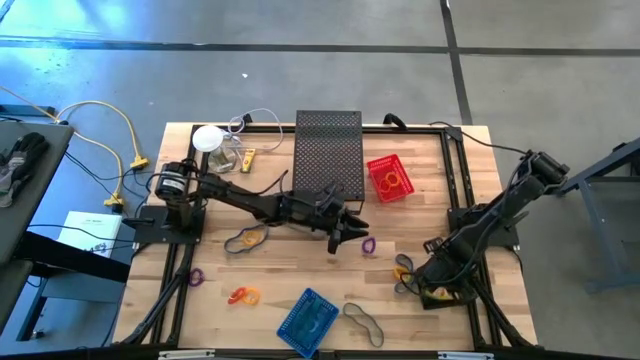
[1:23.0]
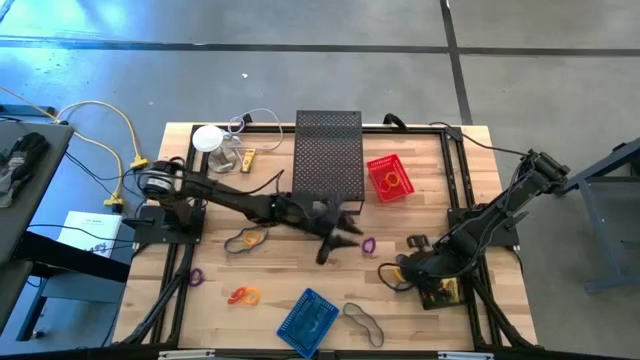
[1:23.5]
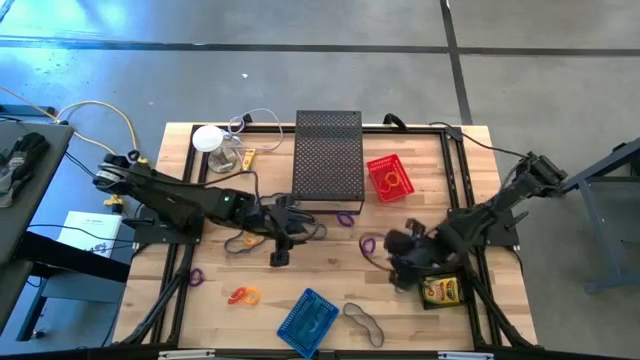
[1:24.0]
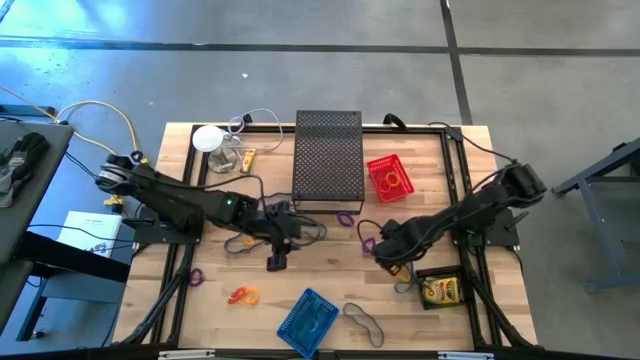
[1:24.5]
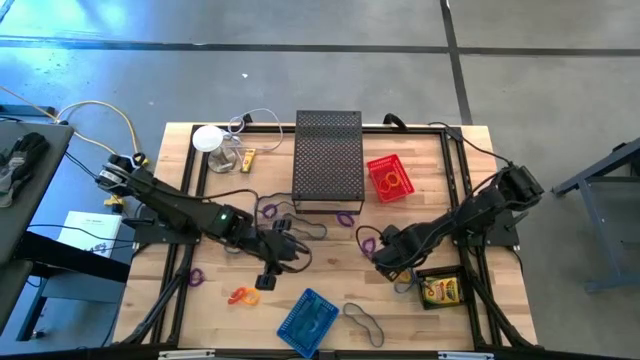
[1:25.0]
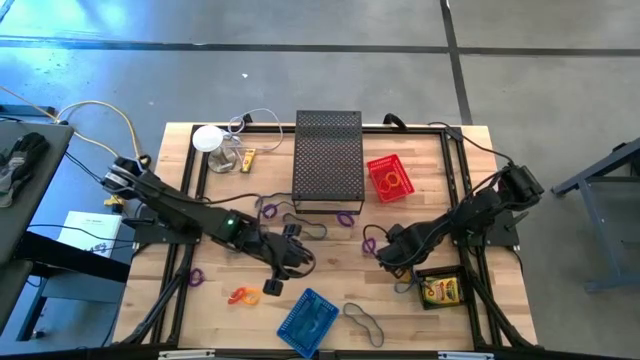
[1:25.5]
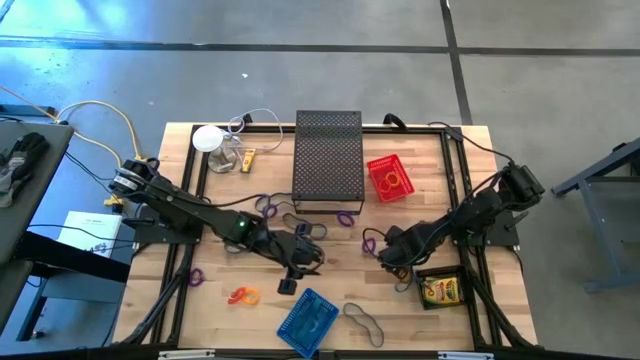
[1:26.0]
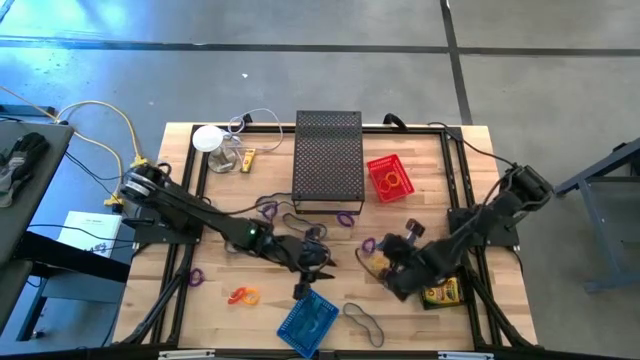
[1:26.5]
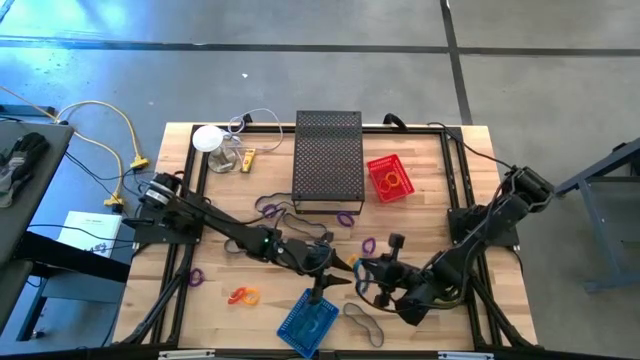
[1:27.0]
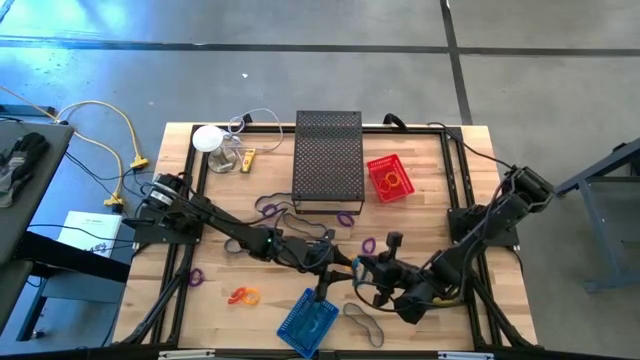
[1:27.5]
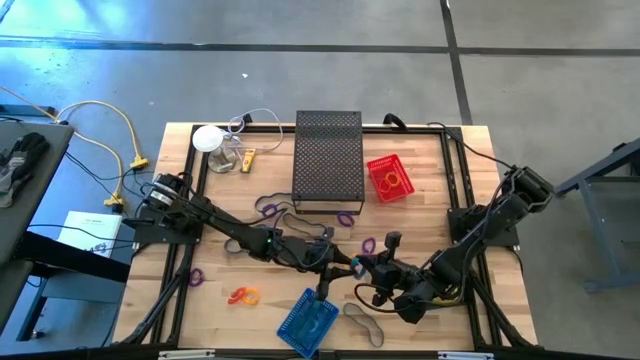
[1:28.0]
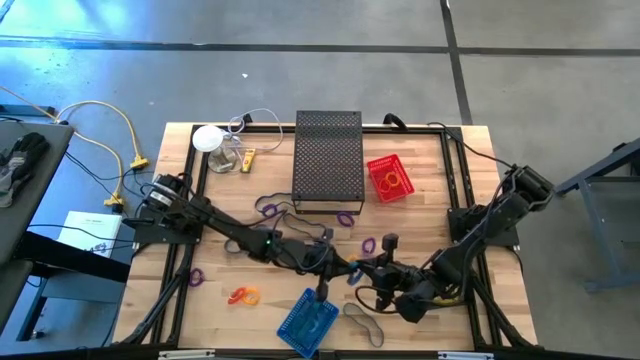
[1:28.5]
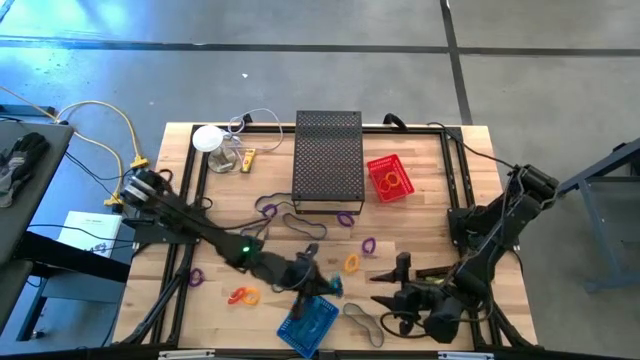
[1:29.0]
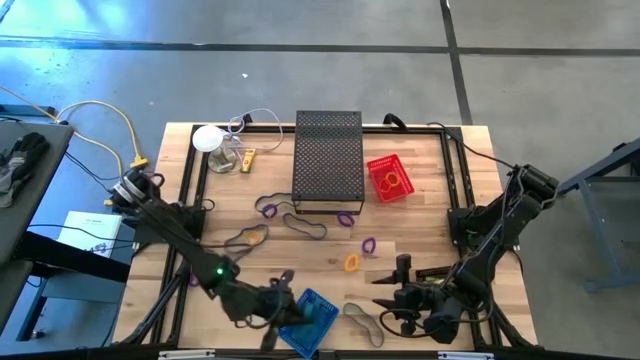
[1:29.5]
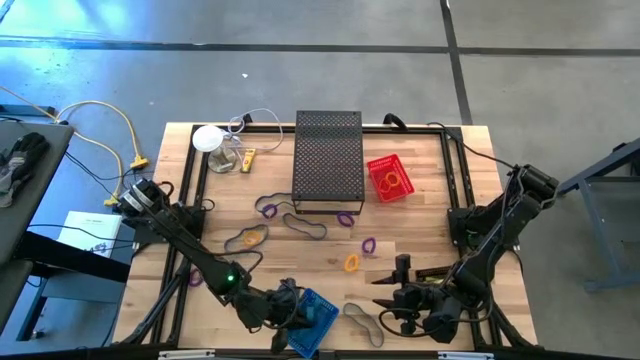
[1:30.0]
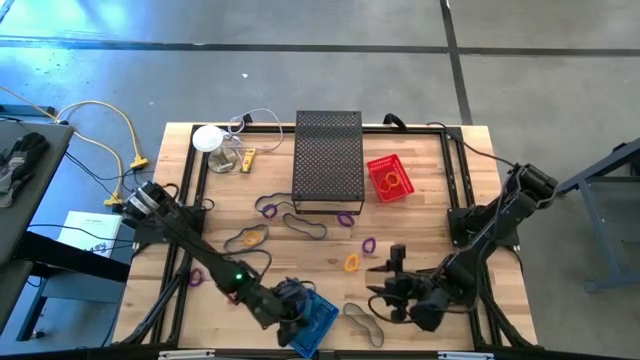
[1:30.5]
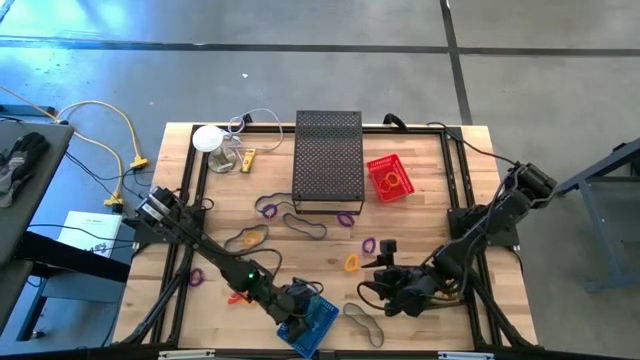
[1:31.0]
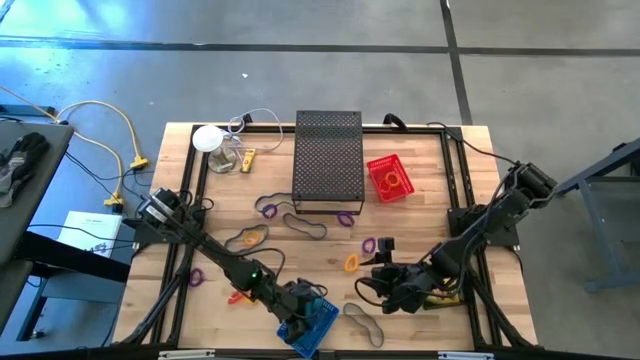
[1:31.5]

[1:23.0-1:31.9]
Task: Pick & Place Office Desk Supplies
Put the blue rubber band into the blue bin

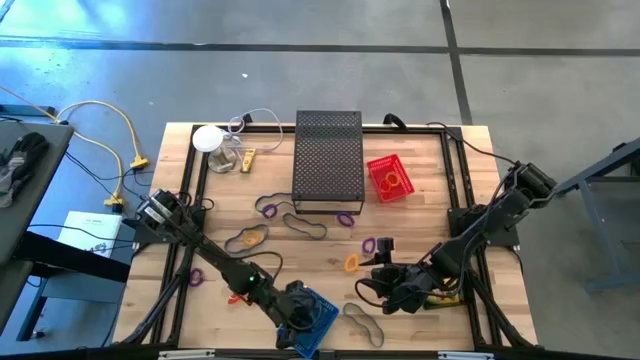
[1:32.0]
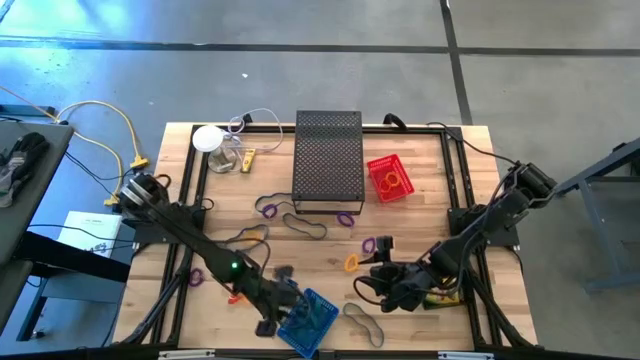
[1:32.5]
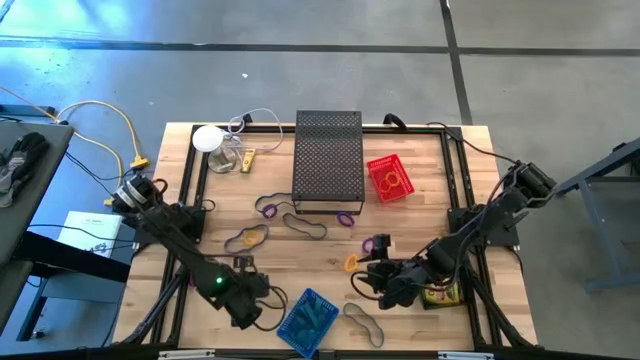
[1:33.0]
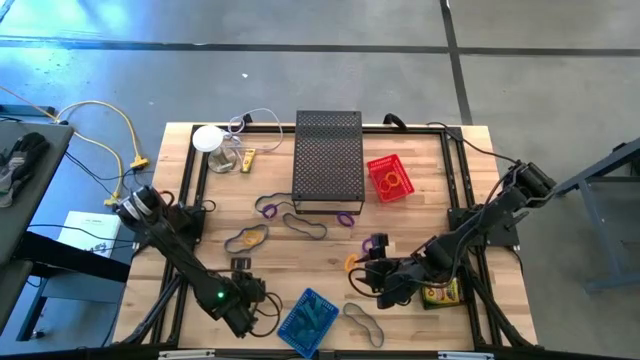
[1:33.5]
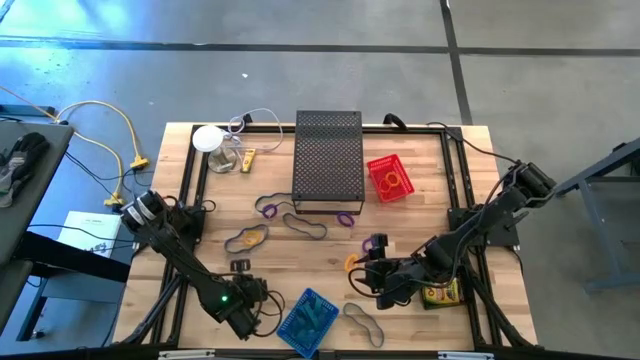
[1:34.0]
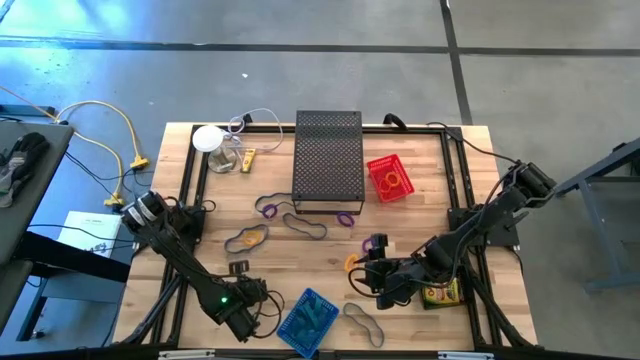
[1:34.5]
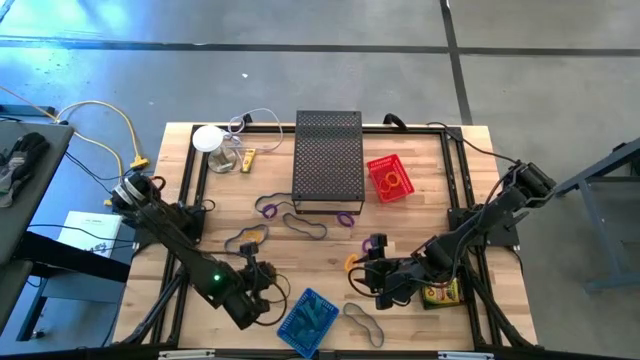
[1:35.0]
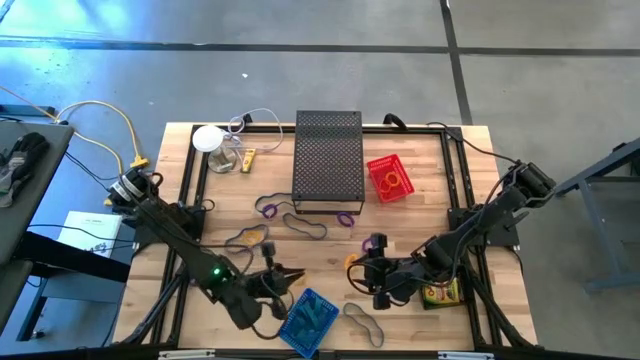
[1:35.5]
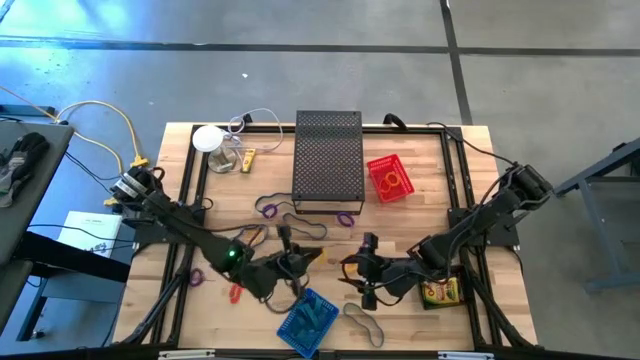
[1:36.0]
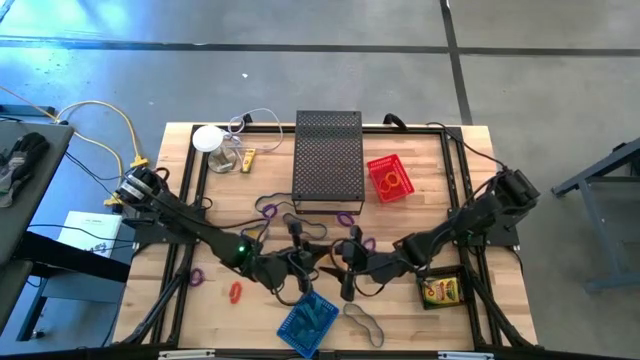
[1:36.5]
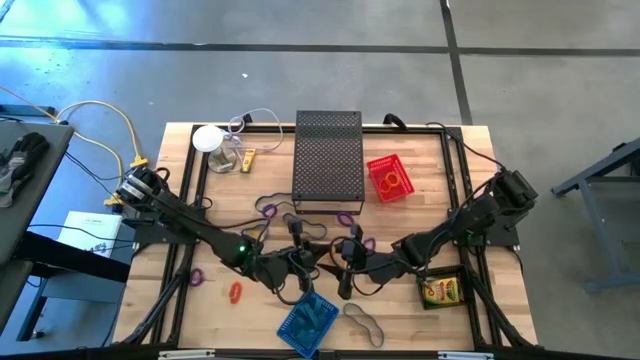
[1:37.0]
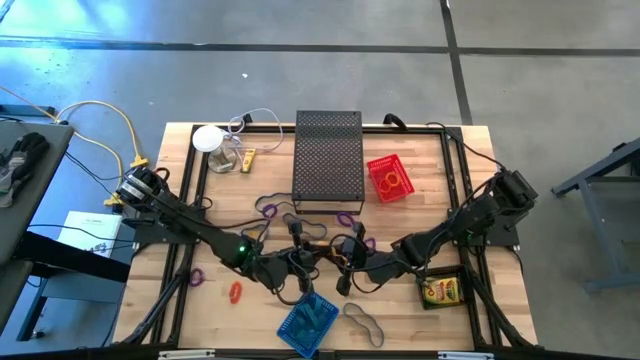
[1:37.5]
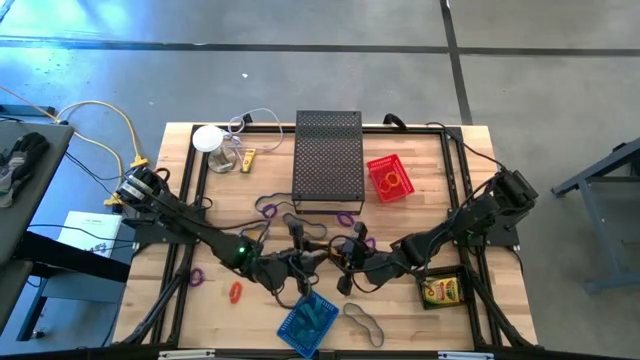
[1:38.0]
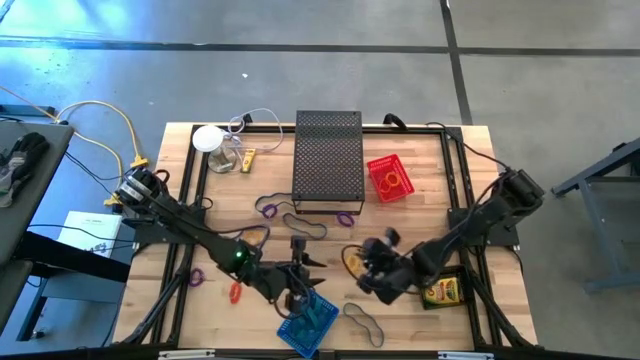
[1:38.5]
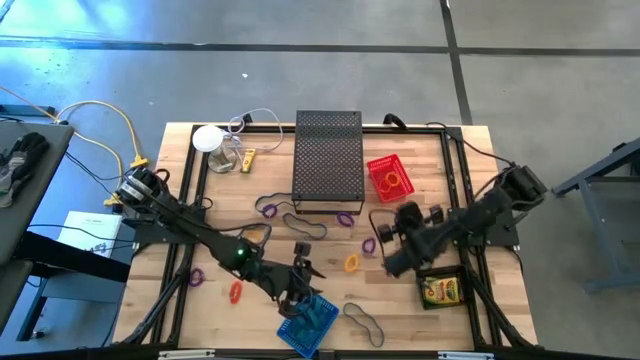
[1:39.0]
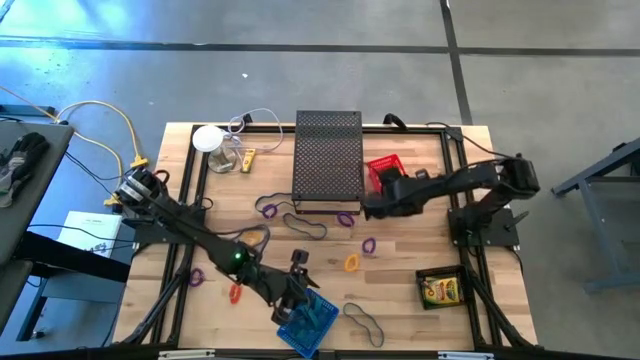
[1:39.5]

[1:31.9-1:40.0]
Put the yellow spring keychain into the red bin

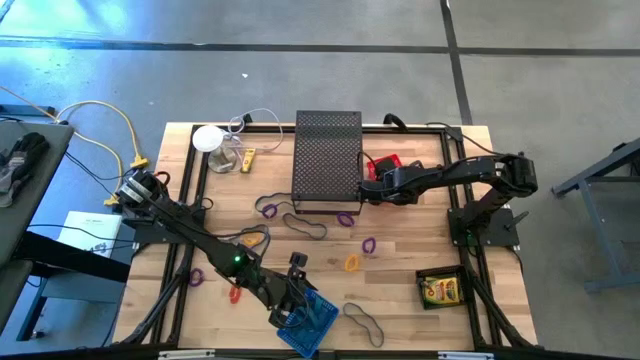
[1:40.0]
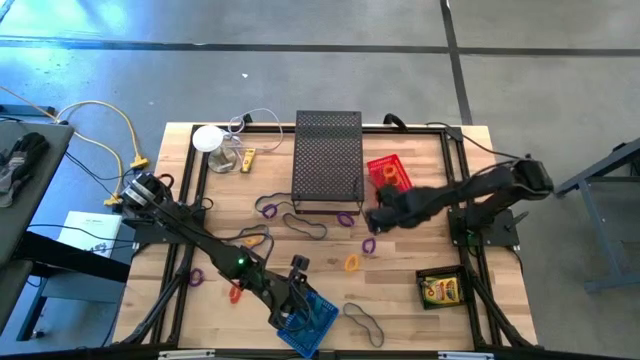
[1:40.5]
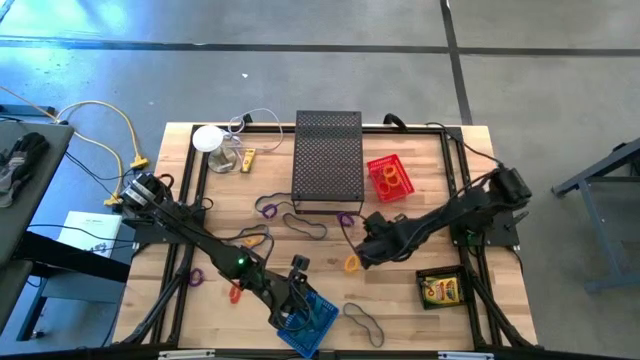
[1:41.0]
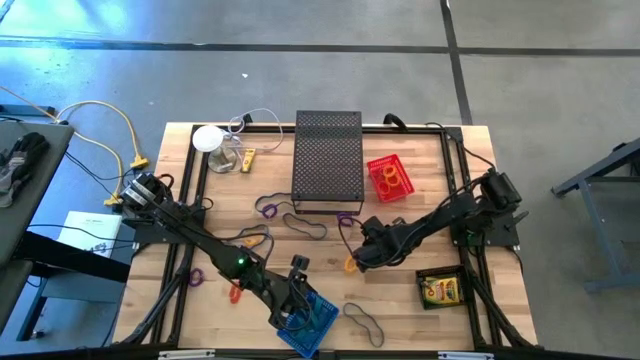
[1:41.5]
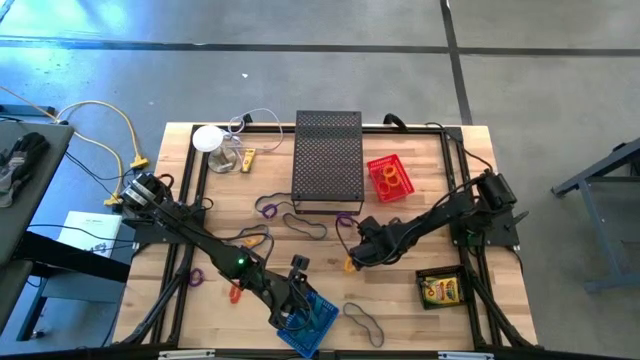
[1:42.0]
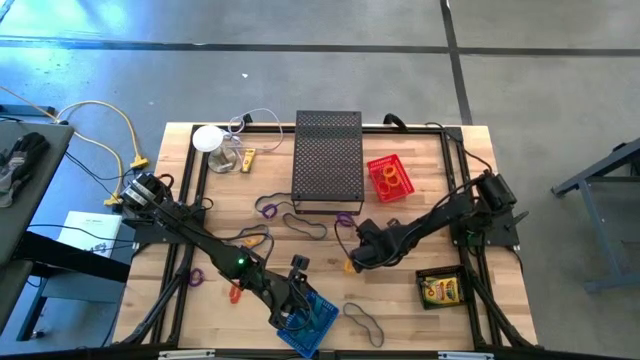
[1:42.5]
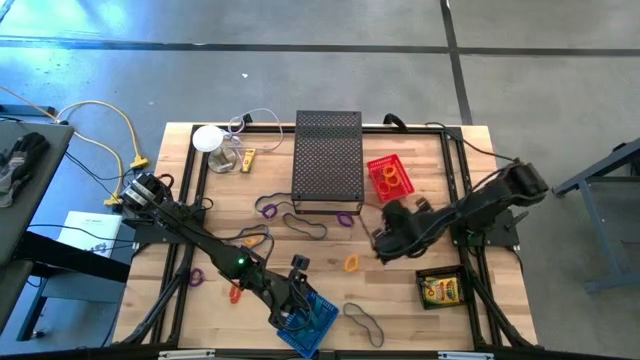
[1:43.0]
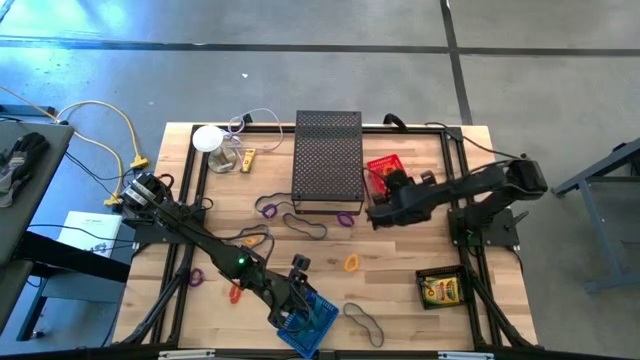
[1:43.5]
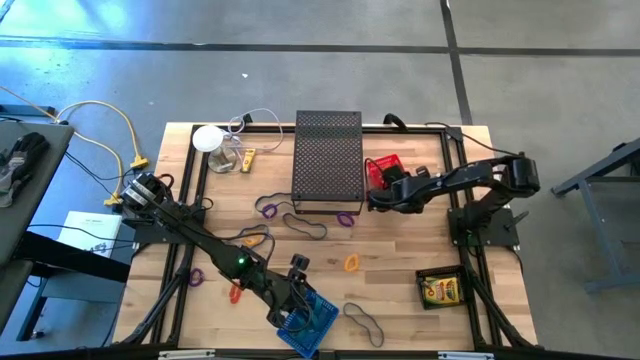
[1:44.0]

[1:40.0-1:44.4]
Put the violet spring keychain into the red bin
